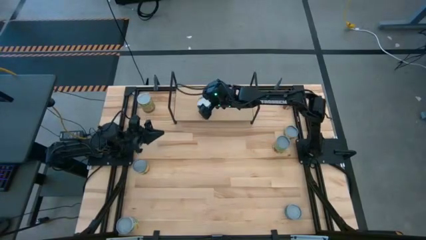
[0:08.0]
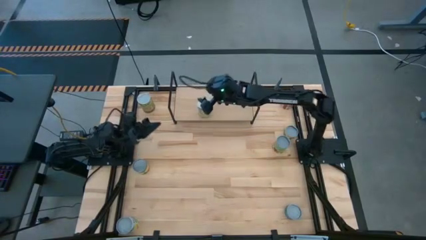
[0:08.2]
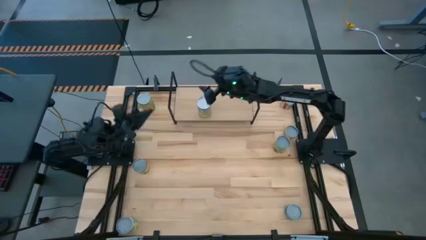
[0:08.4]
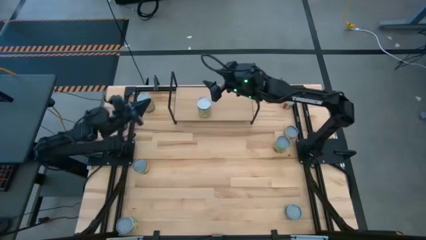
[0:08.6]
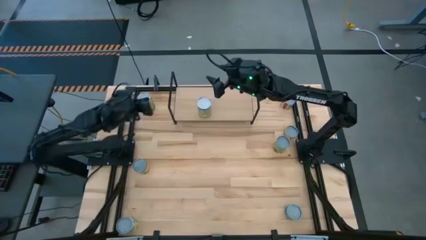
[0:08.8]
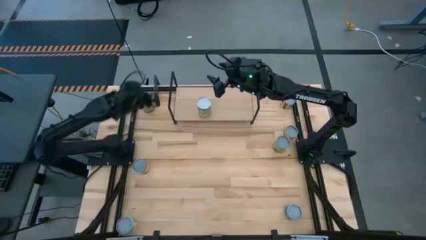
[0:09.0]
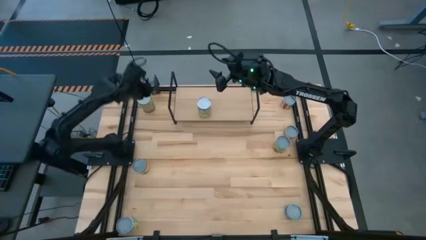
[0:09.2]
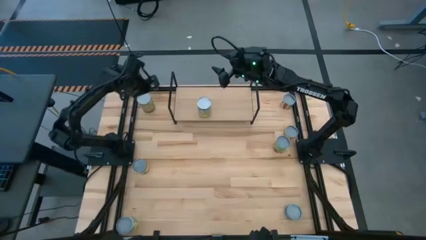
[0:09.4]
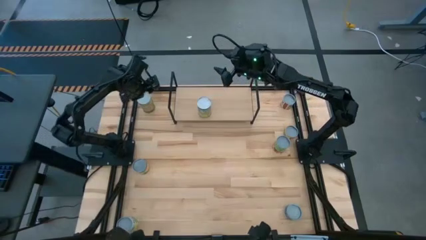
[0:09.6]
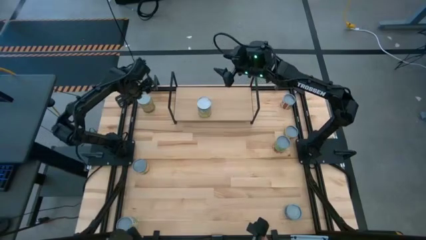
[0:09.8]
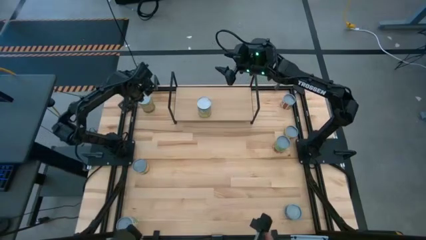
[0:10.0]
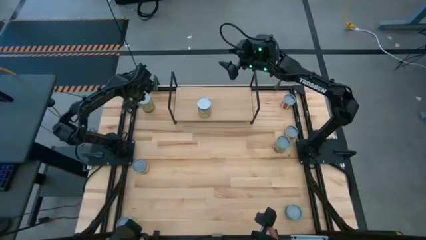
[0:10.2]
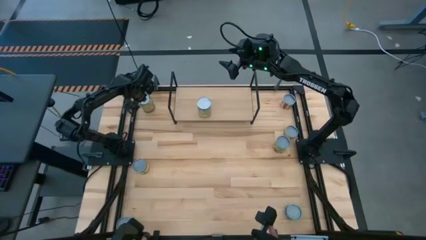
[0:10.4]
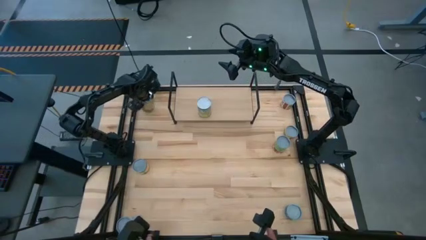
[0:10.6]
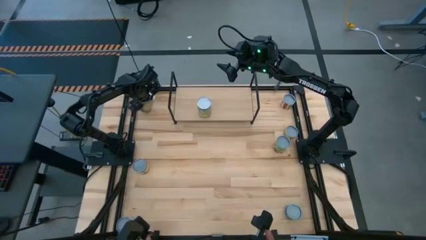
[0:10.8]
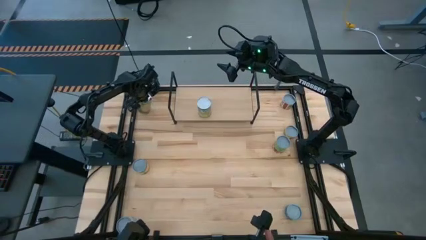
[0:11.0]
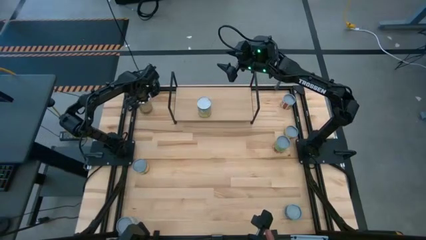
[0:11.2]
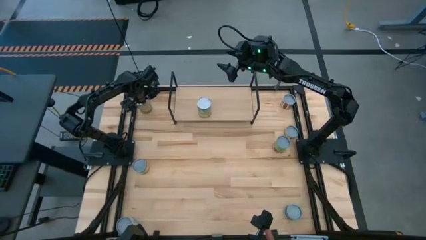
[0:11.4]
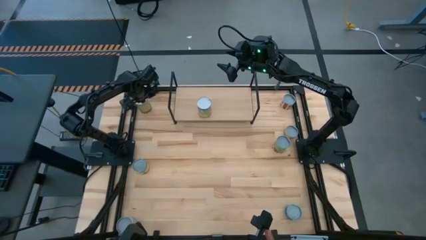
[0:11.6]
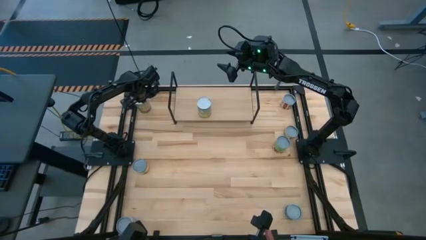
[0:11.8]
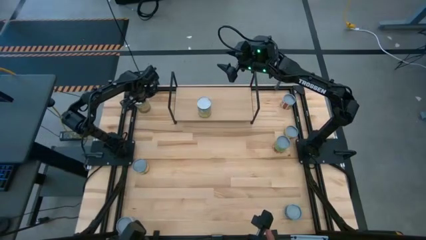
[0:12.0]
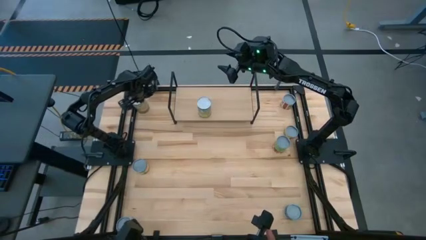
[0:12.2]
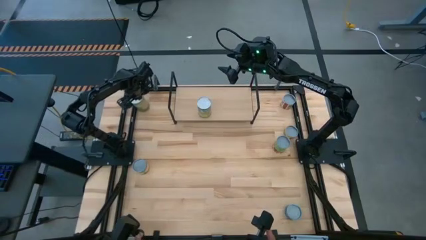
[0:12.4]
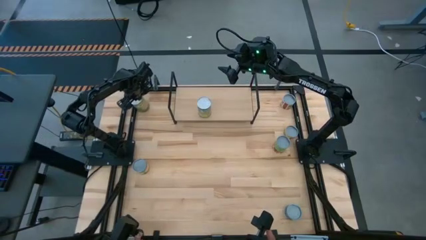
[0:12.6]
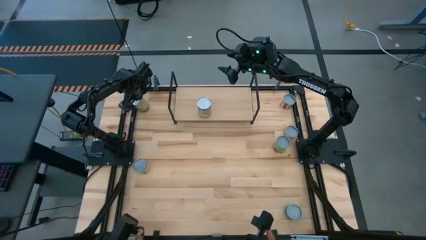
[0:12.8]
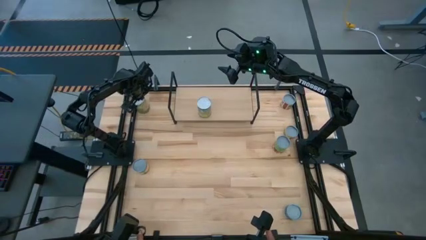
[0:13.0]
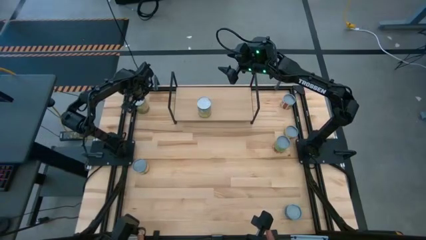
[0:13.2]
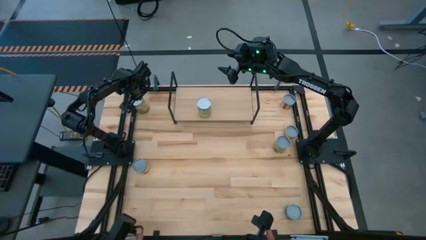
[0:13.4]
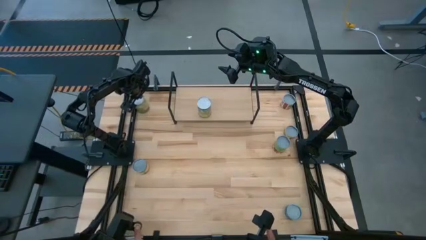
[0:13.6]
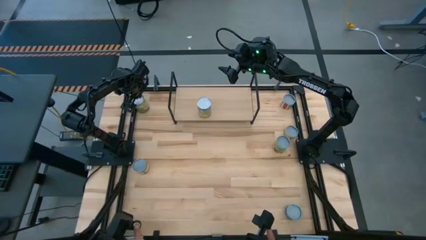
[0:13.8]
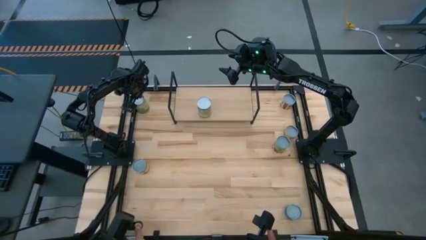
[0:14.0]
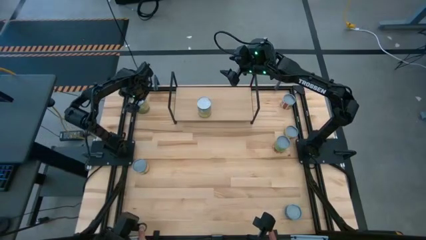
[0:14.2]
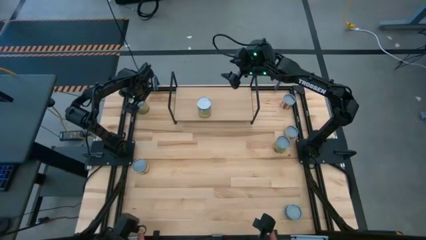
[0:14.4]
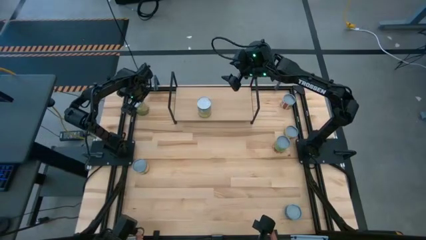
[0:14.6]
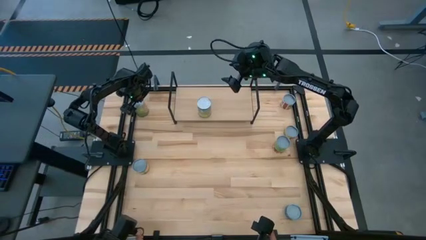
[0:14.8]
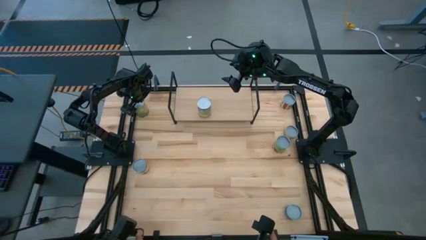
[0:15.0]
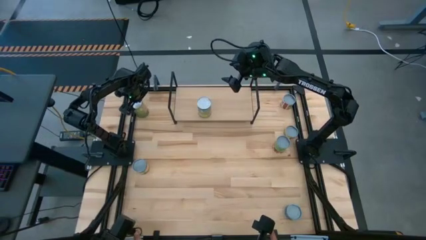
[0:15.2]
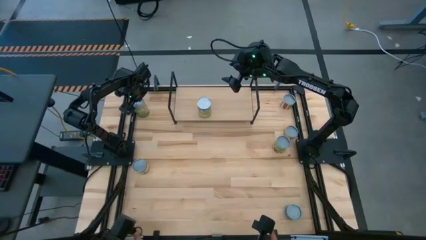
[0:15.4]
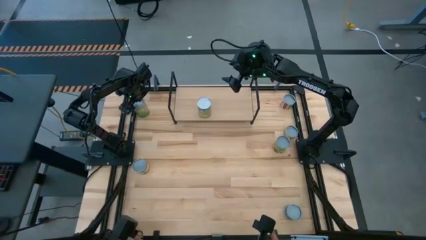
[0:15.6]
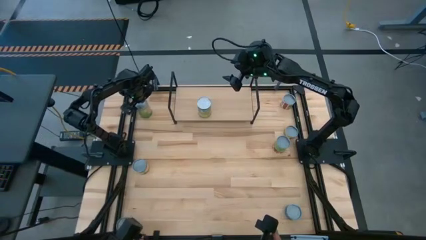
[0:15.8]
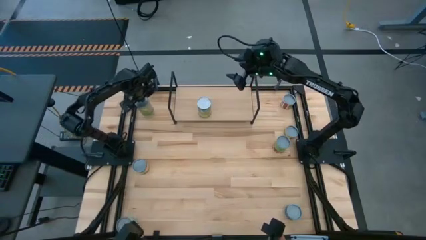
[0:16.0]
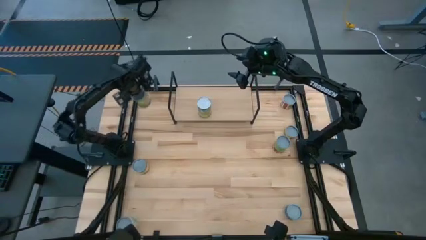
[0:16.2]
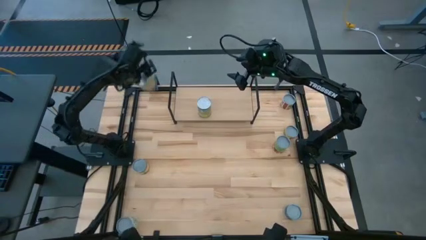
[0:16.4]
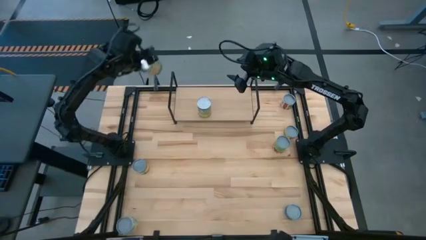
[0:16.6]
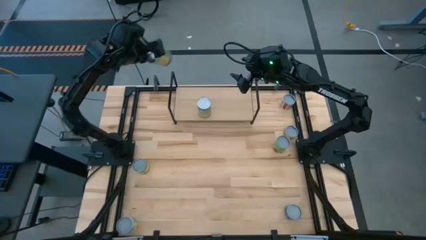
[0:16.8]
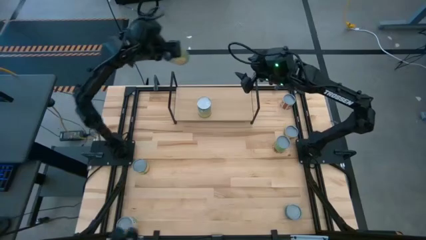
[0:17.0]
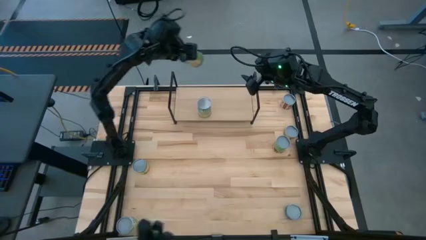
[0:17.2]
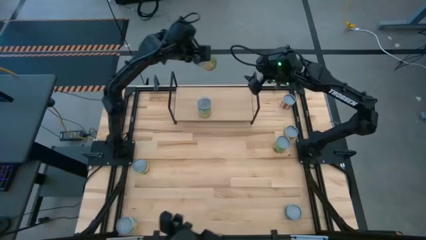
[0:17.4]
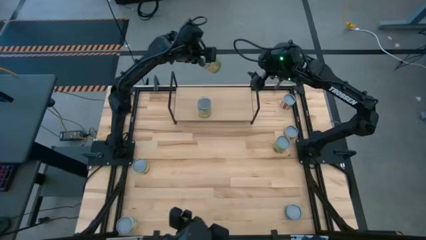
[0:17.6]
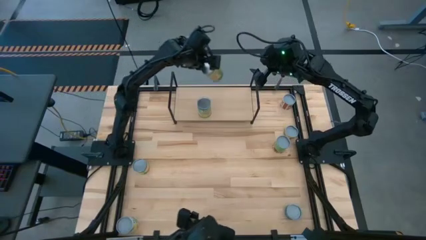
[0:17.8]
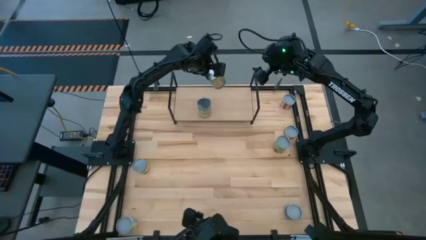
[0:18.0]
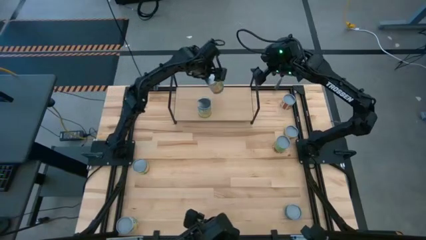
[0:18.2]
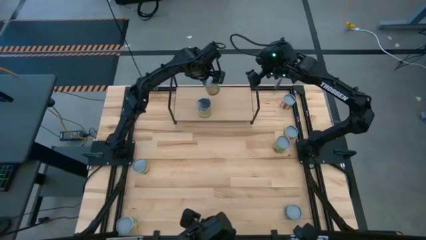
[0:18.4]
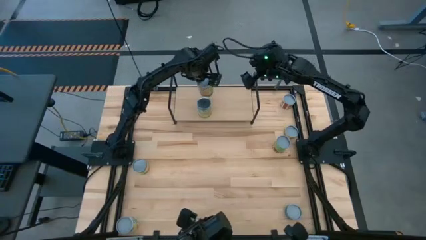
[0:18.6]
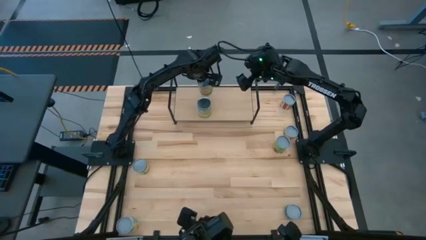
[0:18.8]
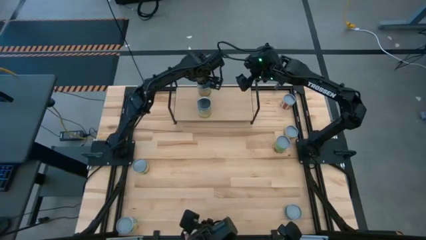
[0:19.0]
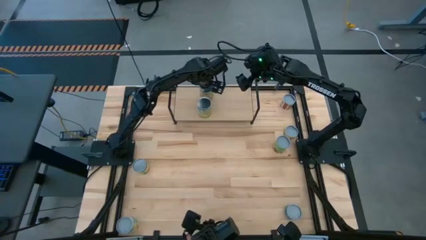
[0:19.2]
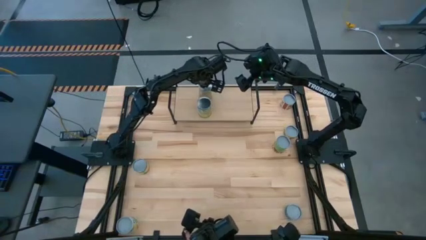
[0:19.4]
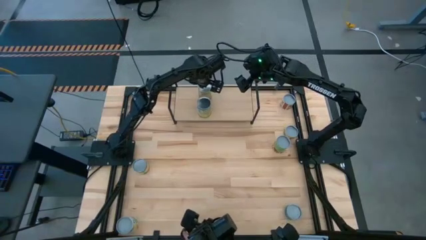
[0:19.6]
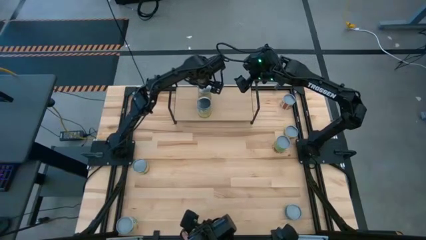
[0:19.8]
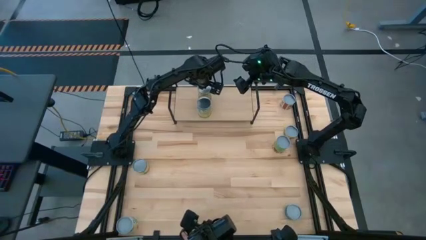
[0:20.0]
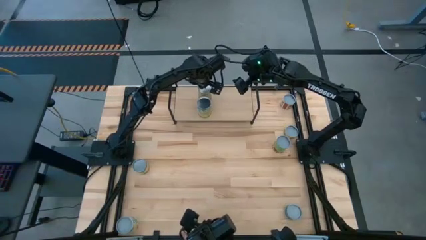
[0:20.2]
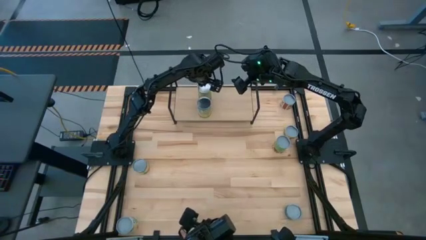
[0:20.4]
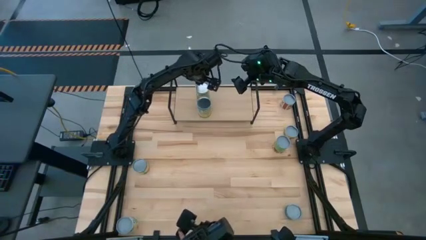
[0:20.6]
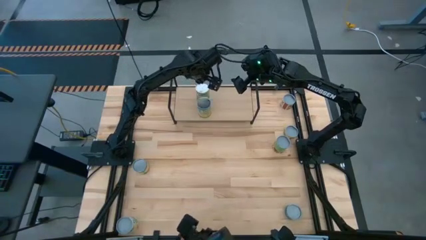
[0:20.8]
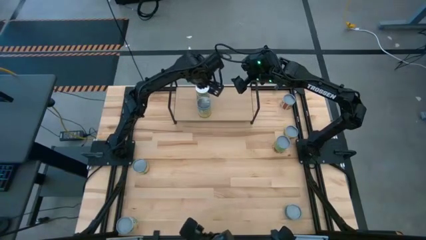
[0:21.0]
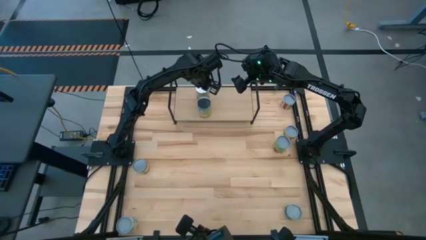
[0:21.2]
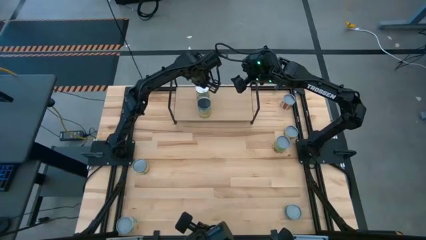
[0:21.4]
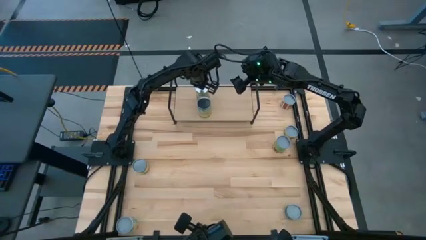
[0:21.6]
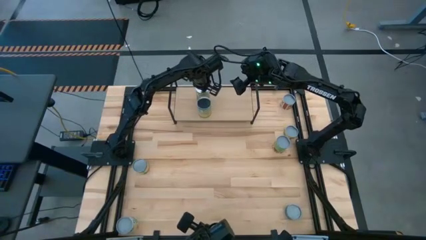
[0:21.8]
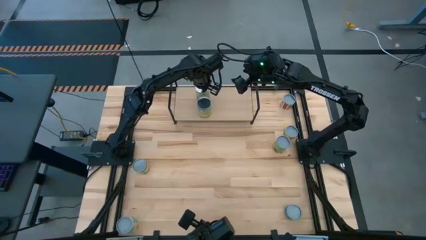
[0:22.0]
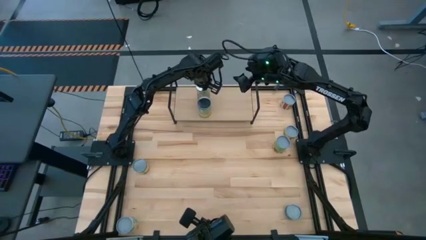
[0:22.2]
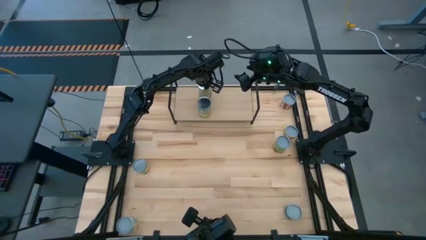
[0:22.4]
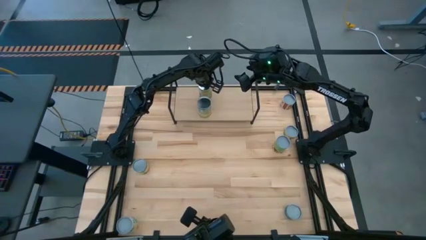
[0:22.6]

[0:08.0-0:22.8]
Task: Pick and place cans onto a shelf
Put the canned oranges on the shelf
